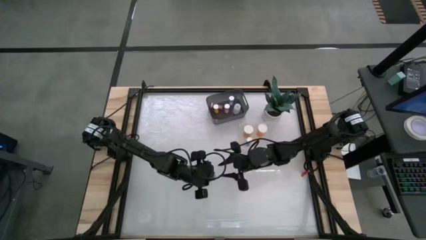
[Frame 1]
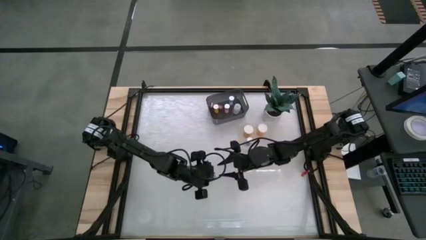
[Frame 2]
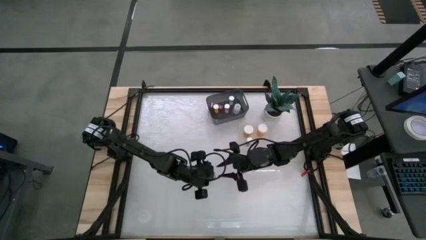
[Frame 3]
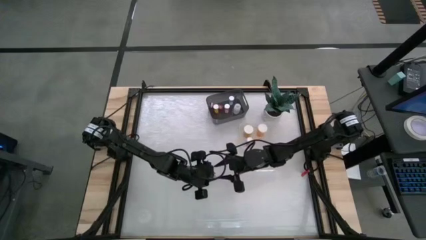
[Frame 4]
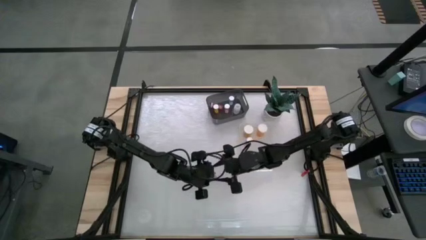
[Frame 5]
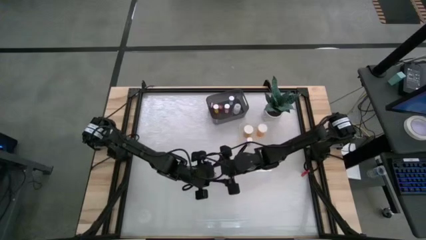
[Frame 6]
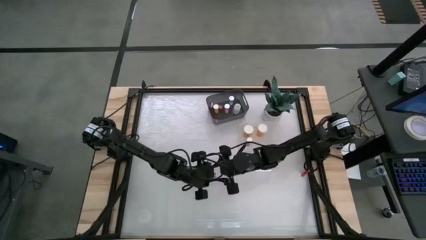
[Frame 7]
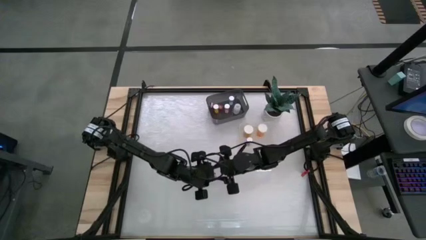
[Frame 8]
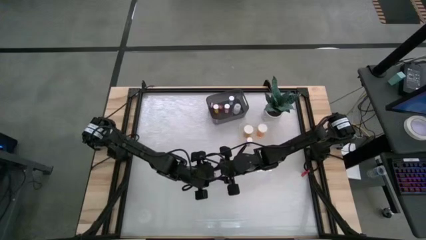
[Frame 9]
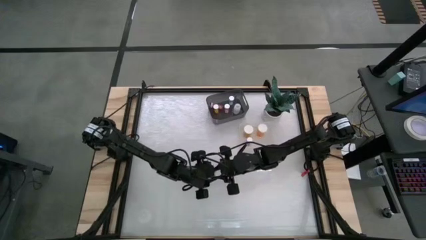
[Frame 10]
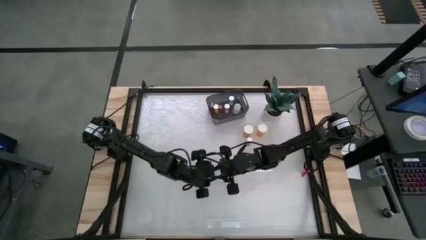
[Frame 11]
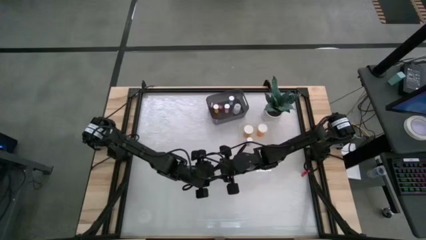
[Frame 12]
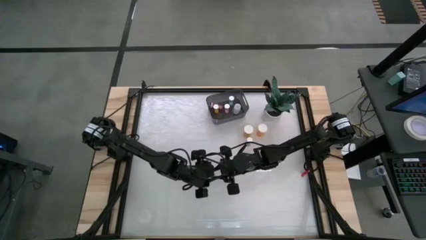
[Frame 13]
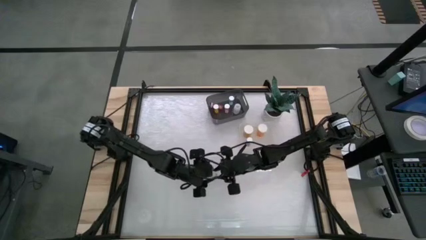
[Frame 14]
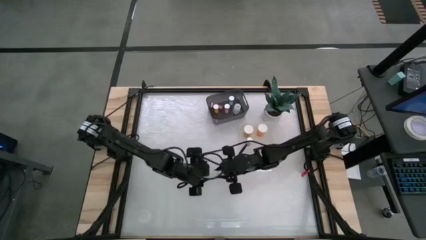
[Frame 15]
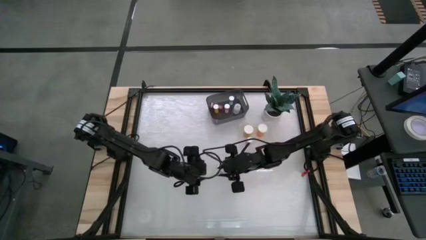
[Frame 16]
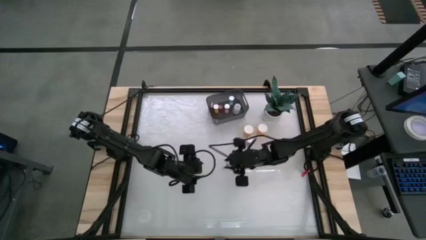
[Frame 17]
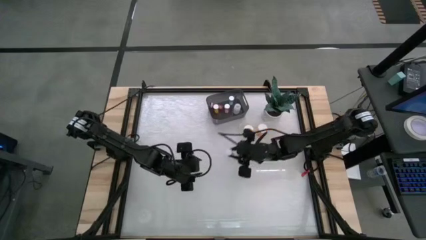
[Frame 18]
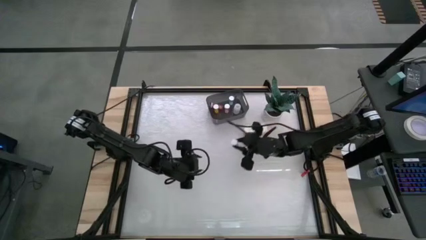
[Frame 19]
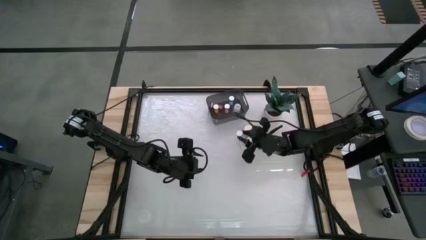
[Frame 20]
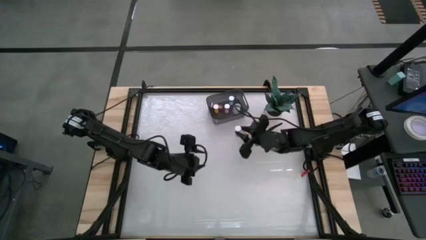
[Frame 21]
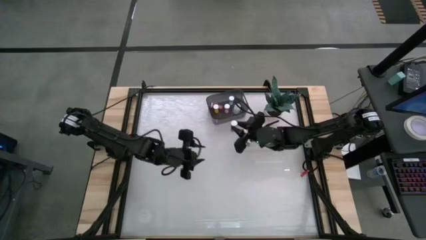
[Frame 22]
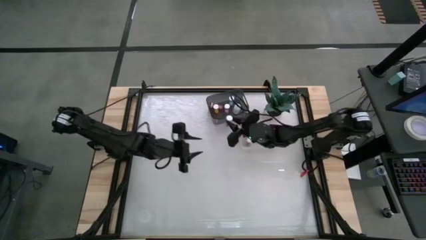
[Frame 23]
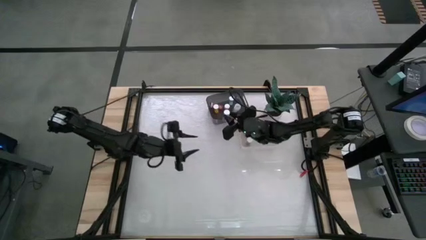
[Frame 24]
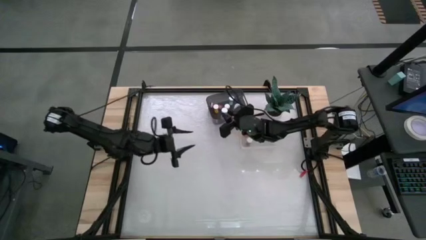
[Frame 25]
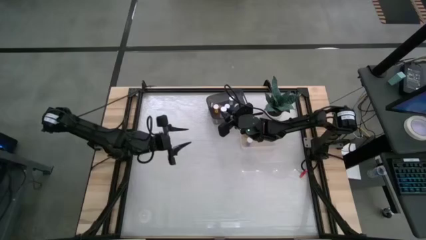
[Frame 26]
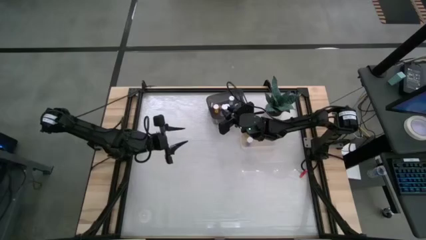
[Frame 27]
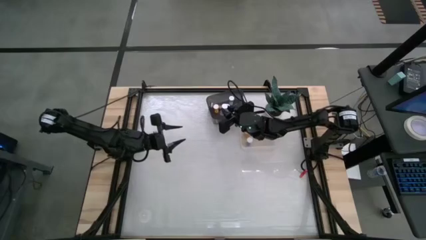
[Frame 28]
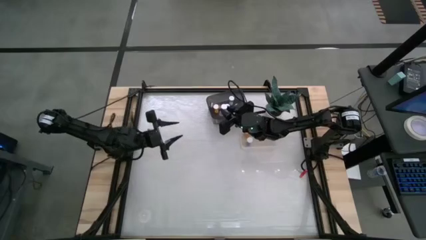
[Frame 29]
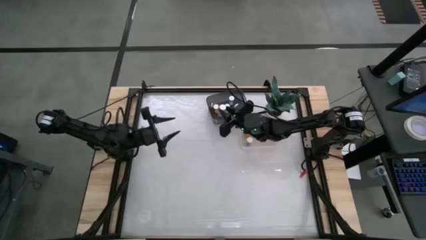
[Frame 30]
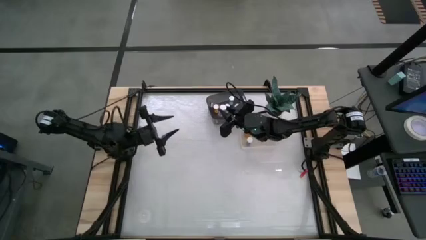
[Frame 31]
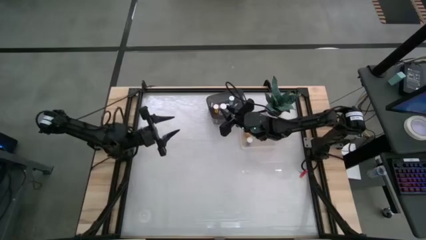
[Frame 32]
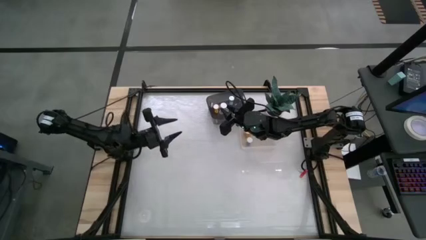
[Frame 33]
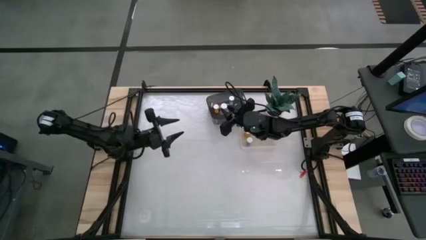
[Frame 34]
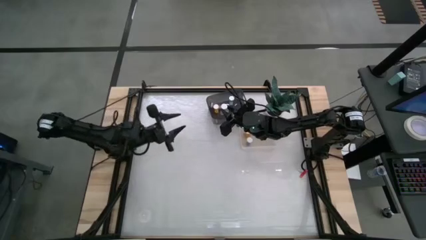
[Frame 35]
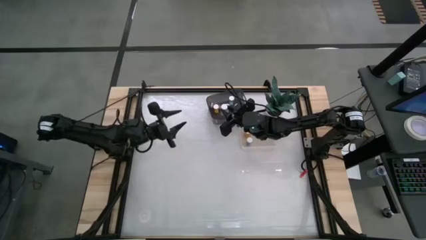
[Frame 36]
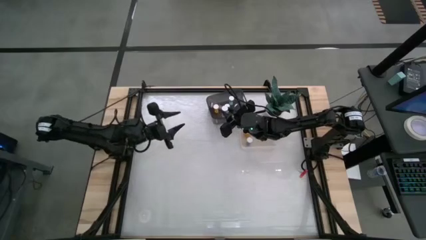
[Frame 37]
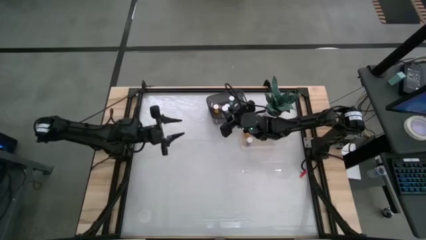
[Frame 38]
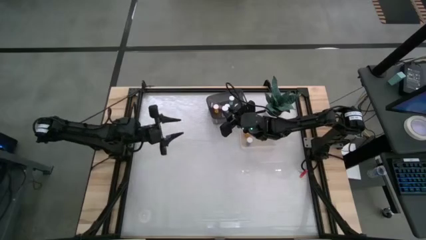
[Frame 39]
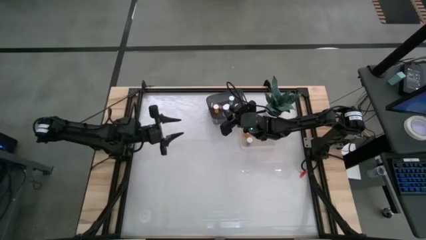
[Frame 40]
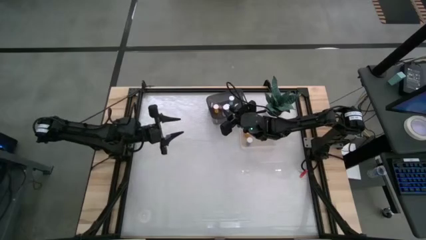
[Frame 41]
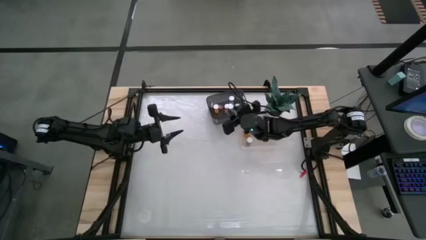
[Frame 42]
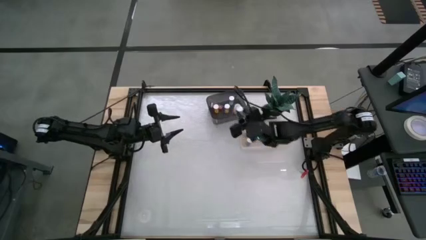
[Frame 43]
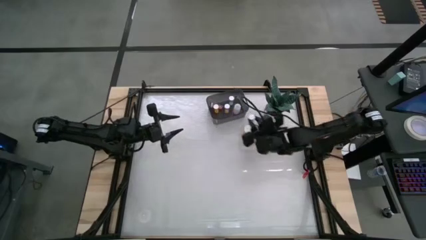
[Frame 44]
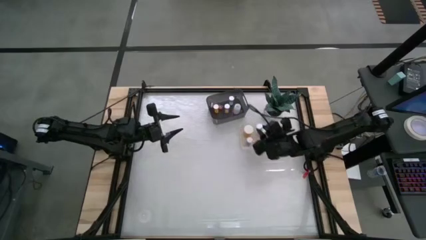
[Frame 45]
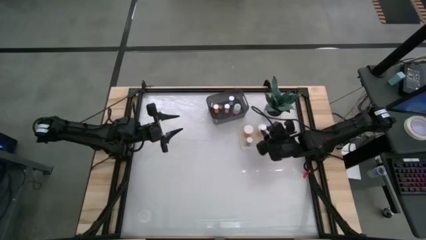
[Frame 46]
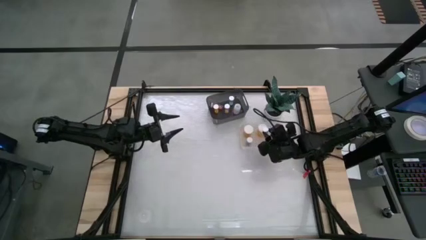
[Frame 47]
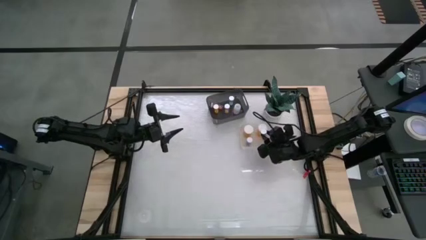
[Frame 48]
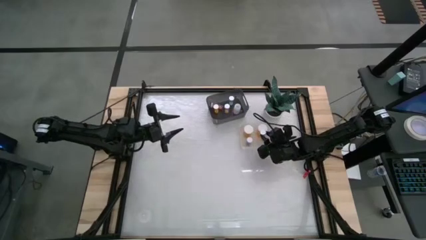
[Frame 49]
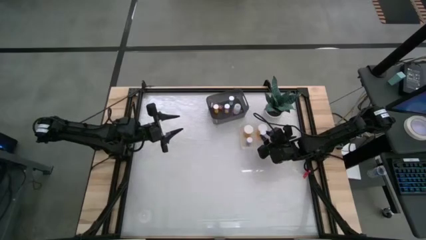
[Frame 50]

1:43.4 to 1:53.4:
Task: Pick and place medicine bottles into bin by pill shape (circle, oval)
Put the blue pill bottle into the transparent bin

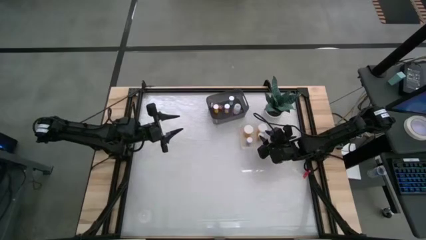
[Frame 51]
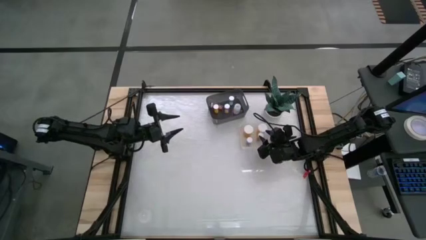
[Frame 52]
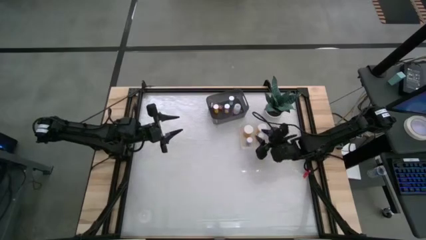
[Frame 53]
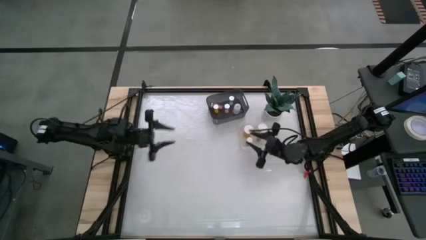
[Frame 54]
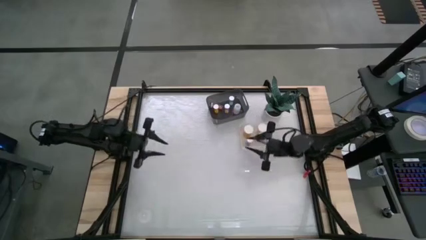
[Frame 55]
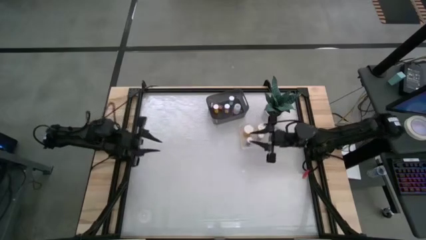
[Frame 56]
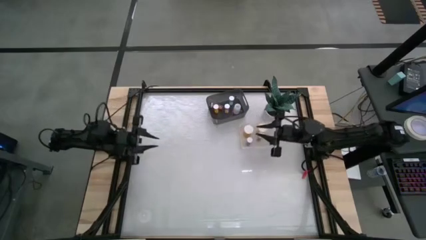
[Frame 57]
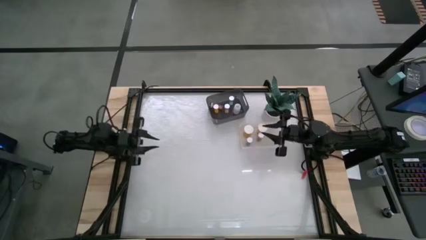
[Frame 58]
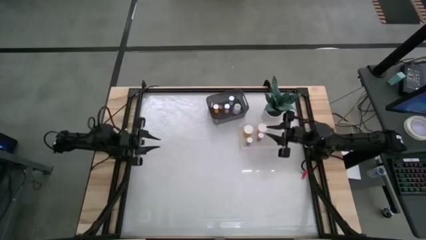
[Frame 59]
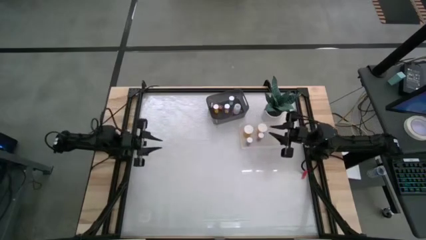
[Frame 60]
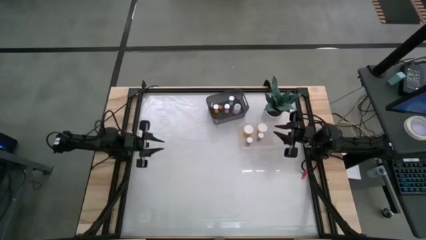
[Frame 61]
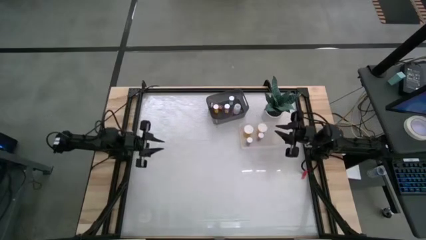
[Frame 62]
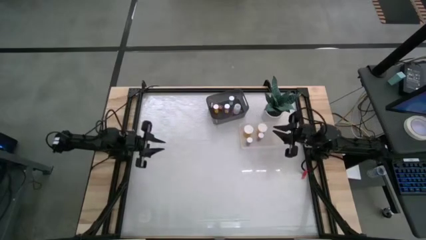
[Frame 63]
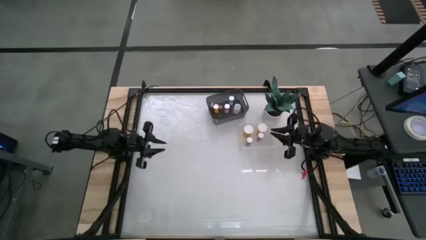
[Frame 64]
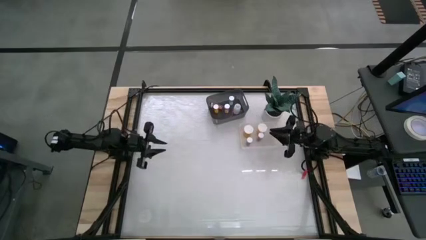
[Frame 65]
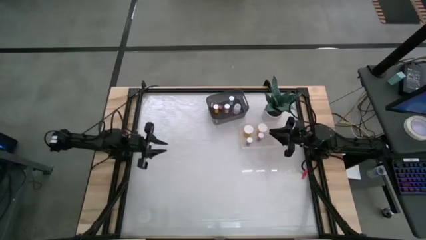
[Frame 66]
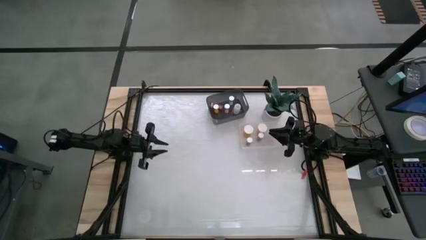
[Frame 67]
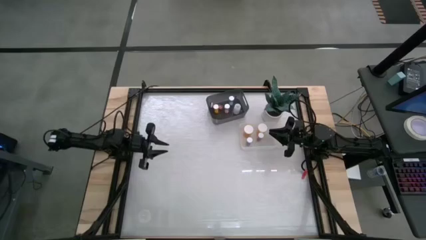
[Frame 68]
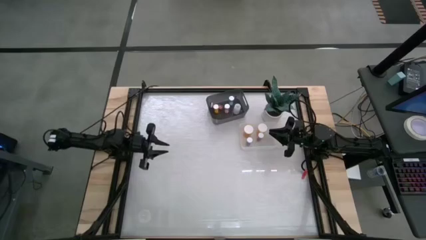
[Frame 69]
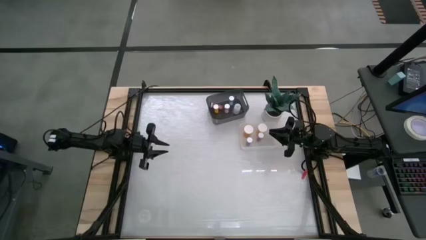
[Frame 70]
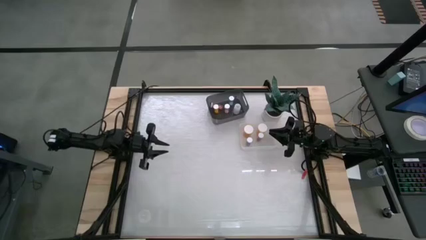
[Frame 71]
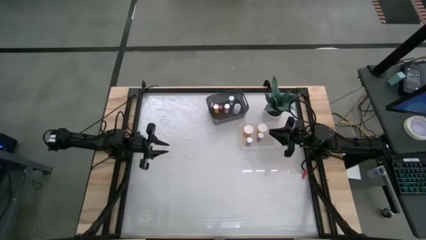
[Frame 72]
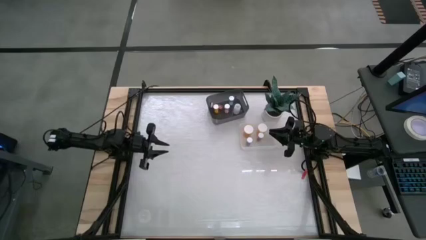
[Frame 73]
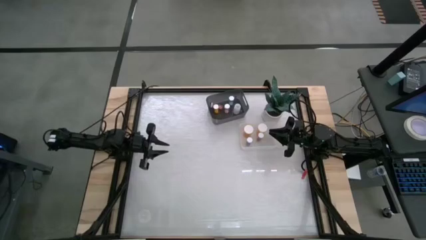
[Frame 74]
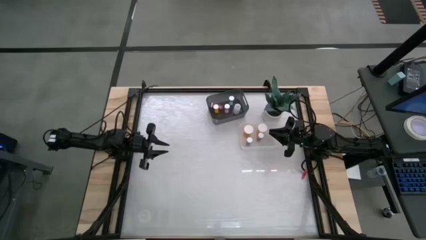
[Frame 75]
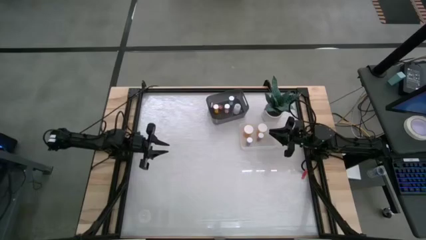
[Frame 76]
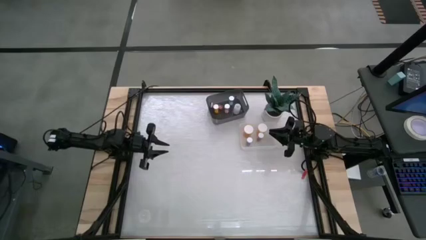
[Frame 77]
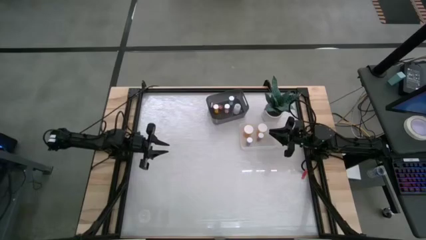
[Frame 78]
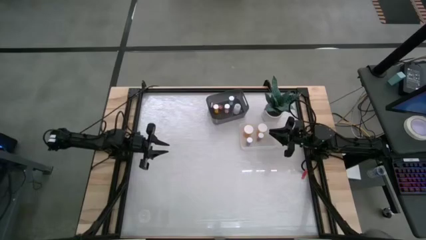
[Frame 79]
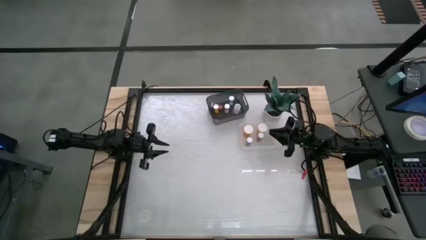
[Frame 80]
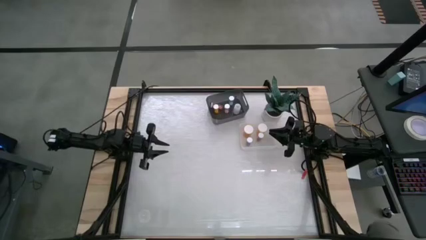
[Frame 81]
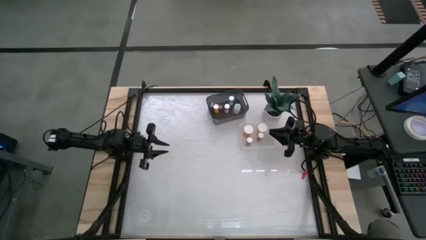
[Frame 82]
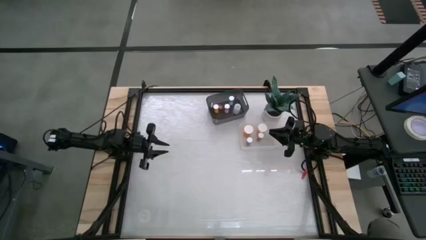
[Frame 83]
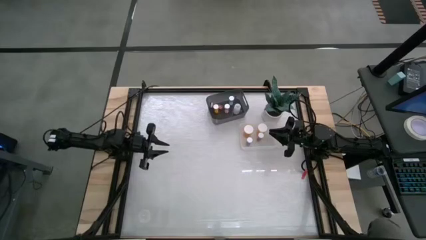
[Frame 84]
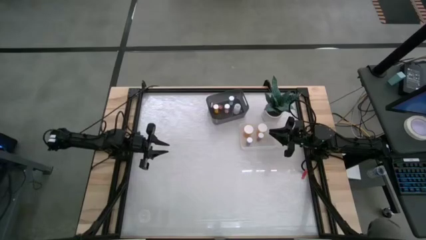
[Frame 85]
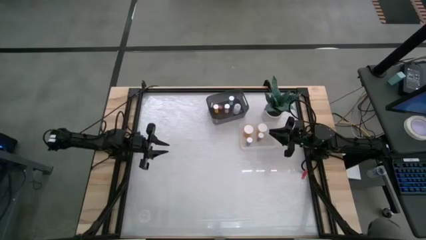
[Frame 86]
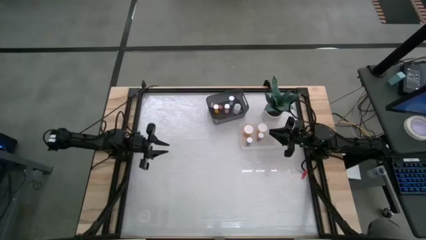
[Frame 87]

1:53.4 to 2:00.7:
Return to Home Position
